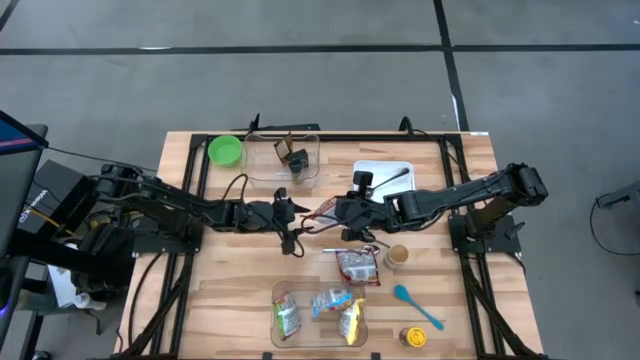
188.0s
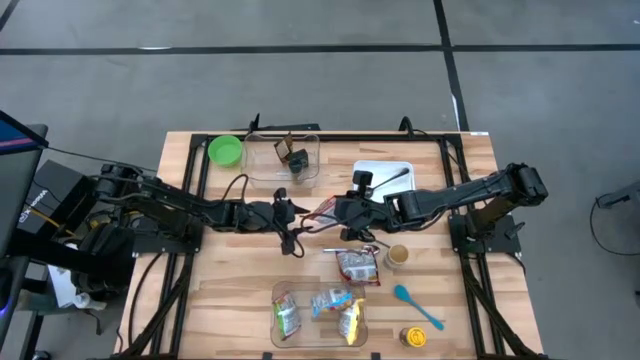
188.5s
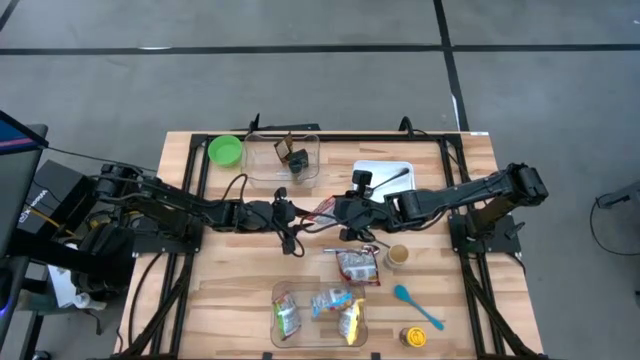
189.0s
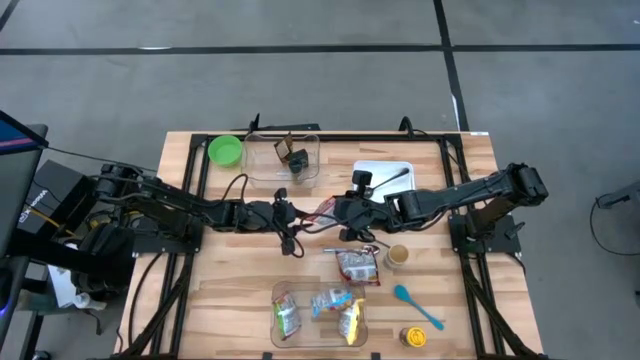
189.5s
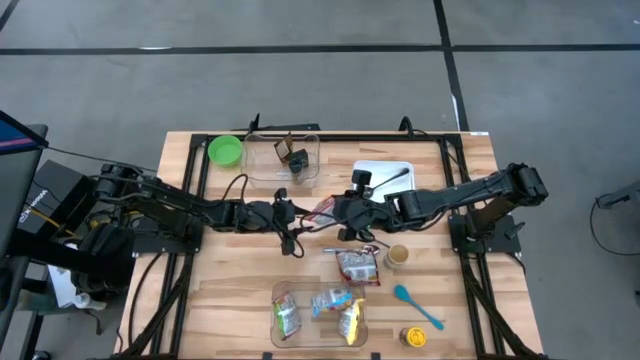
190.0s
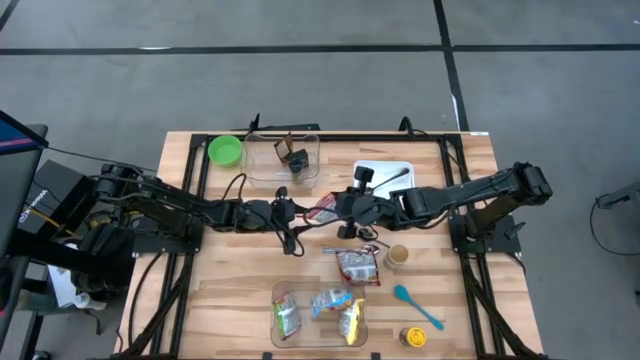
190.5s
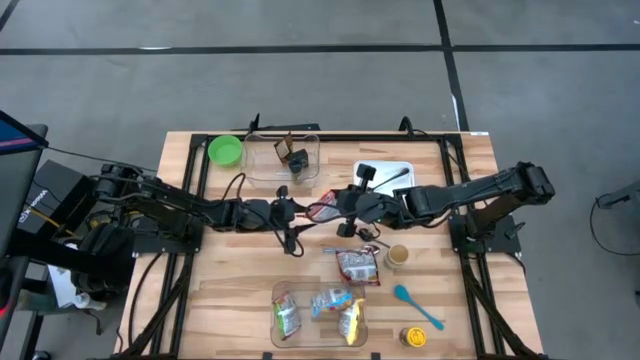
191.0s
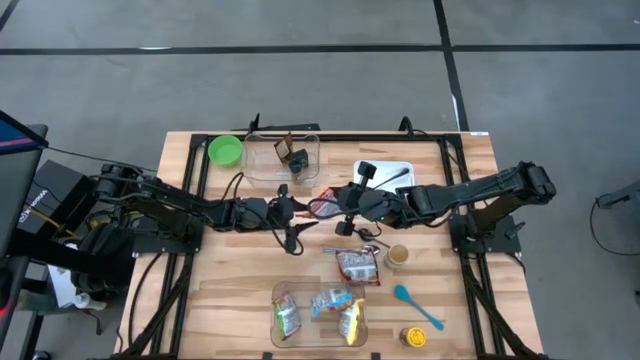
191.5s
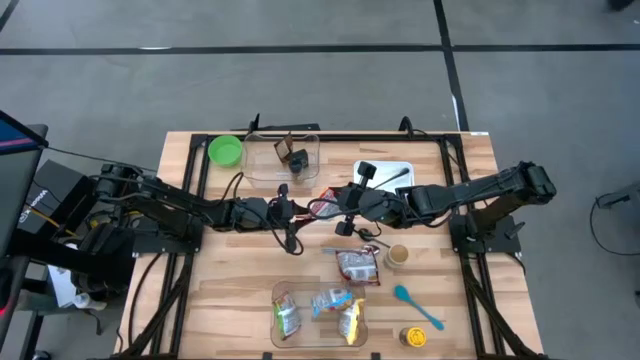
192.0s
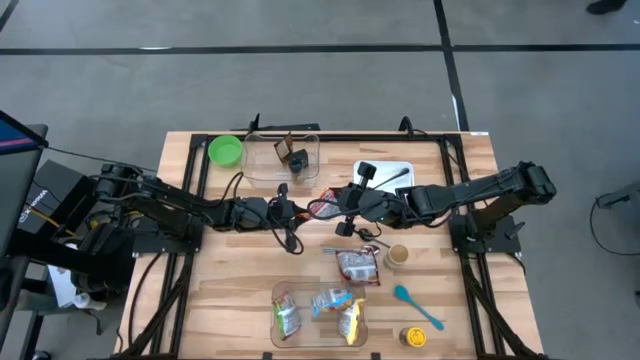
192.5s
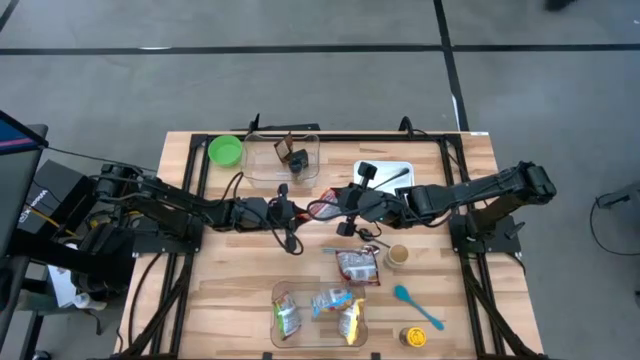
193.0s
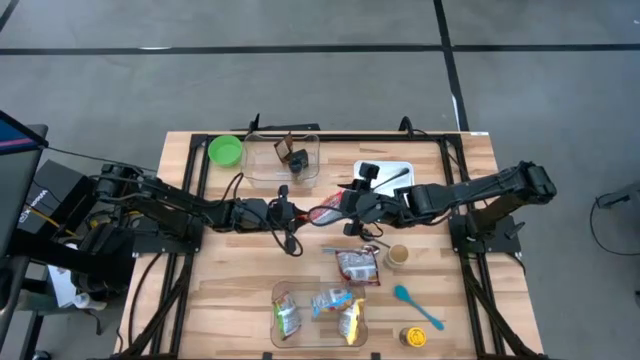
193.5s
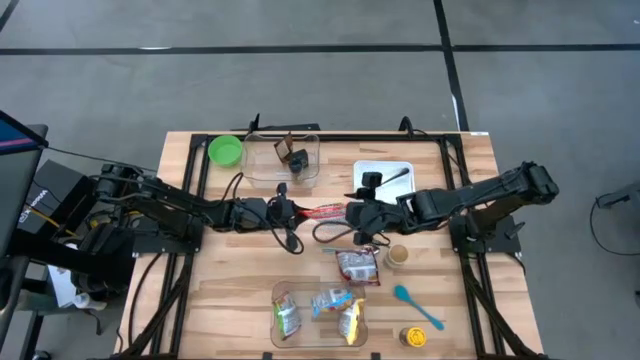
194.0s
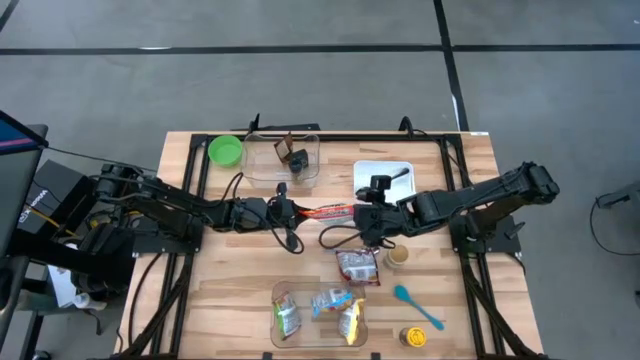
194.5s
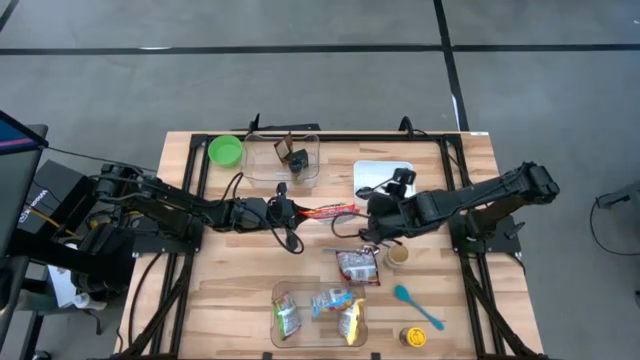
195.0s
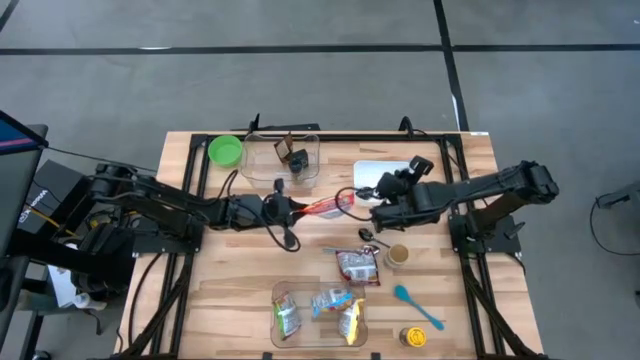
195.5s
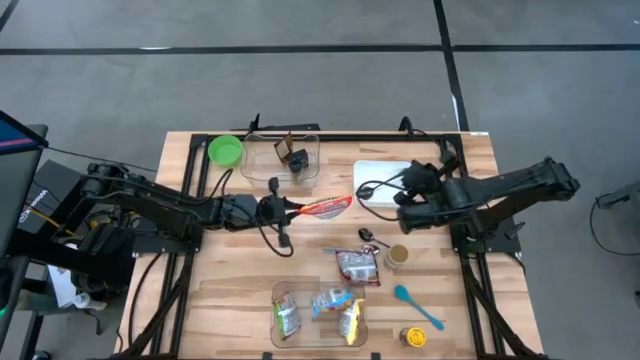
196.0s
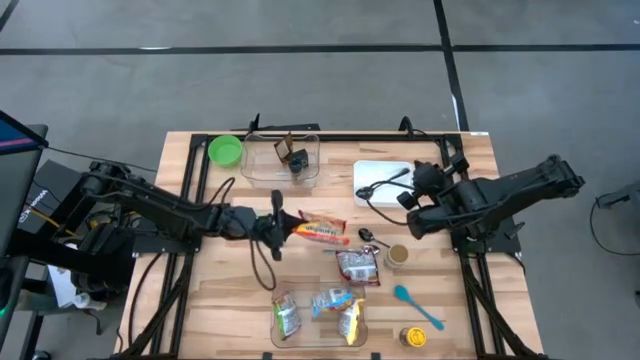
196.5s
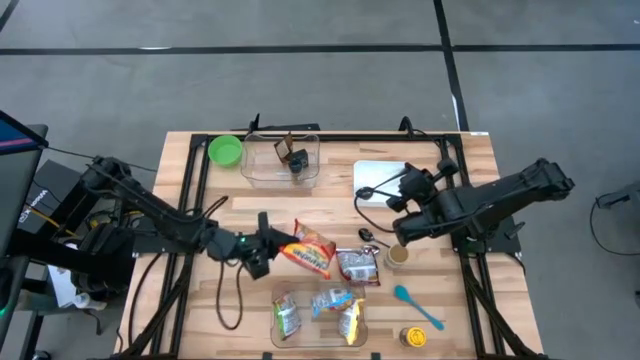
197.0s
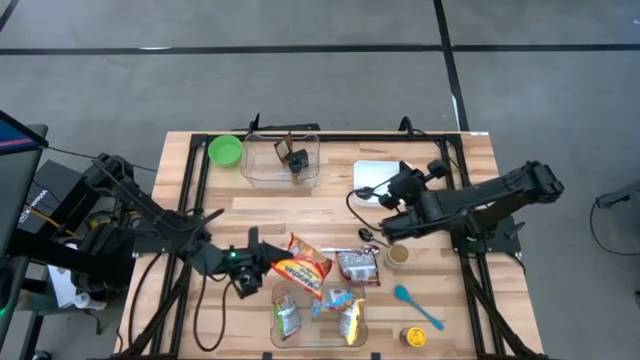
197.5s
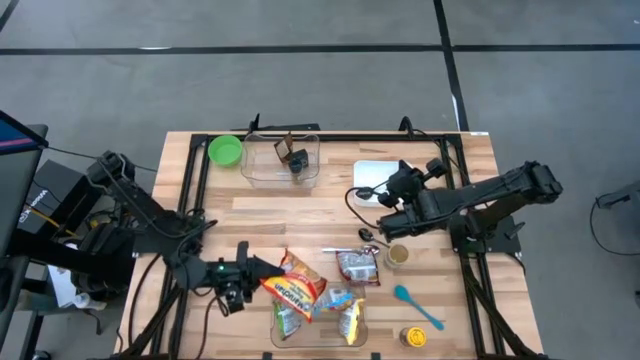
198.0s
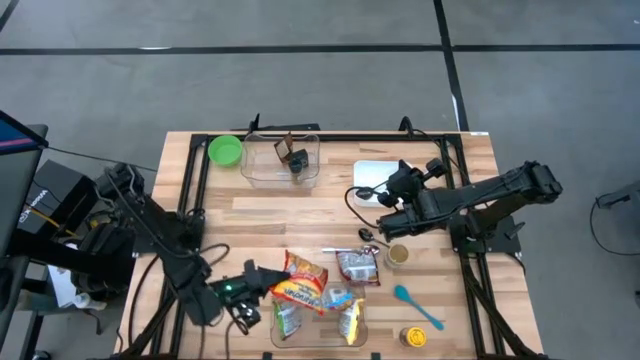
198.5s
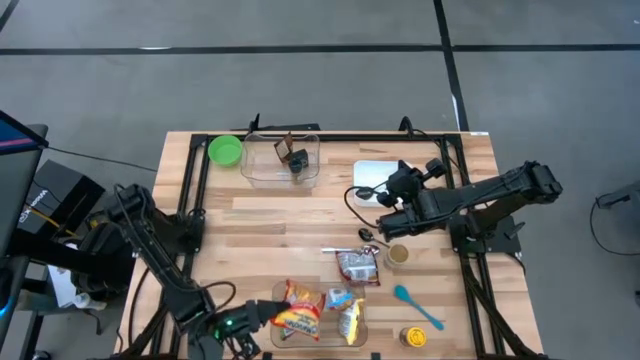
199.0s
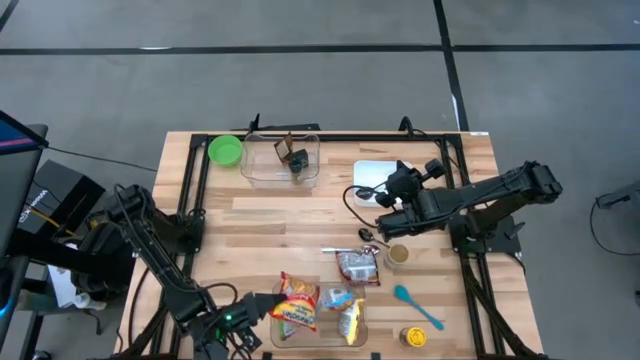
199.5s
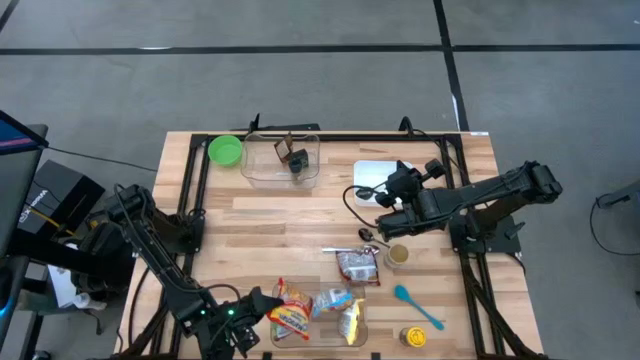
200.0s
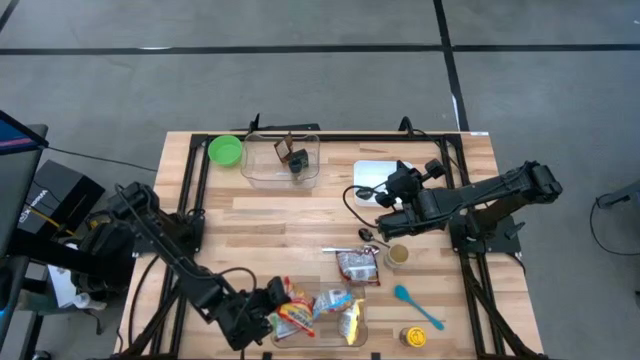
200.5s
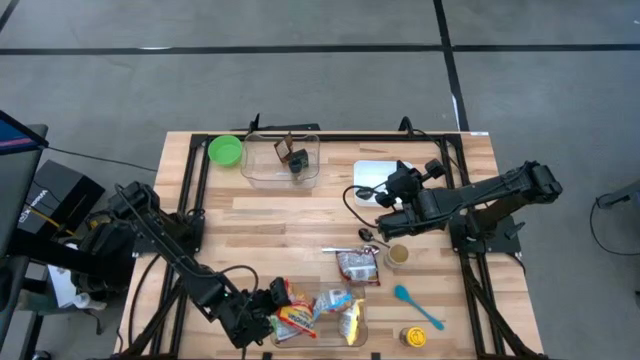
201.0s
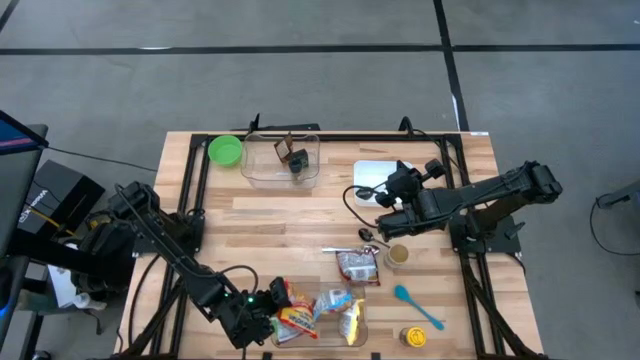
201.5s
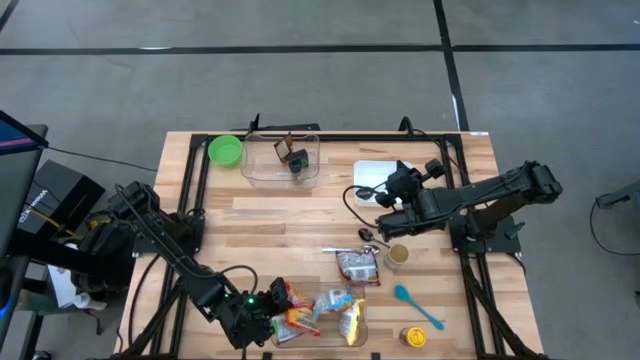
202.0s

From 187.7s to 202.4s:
Task: Pick & Place Food Item
Put the orange noodle pack into the bottom transparent bin

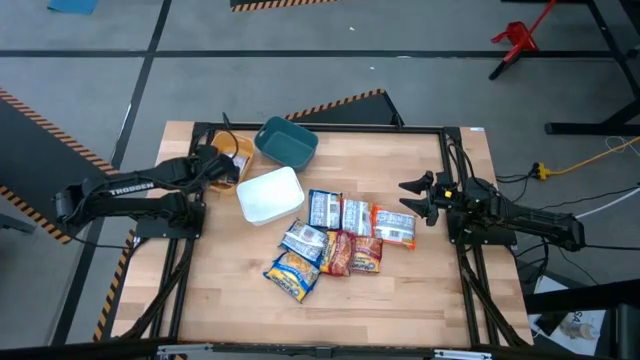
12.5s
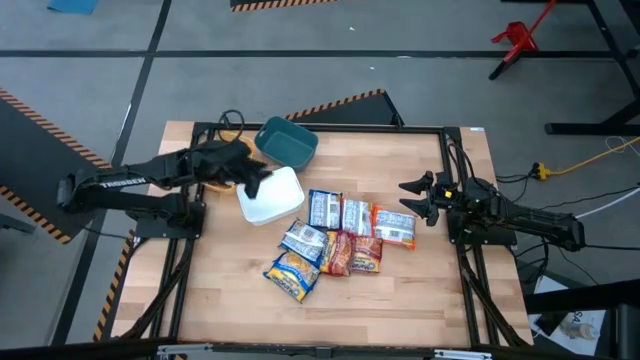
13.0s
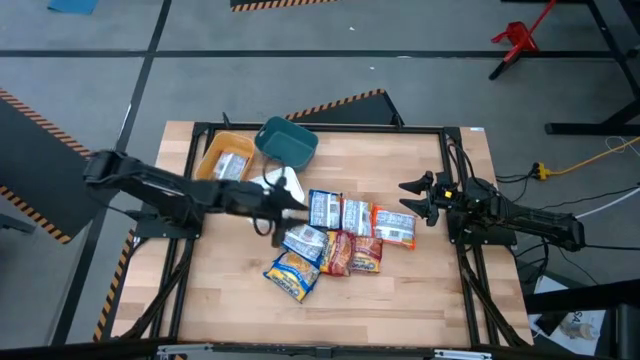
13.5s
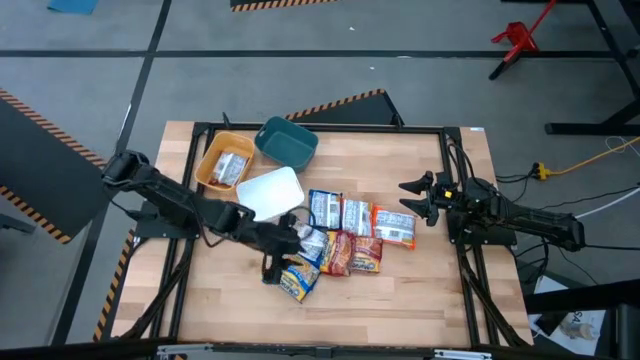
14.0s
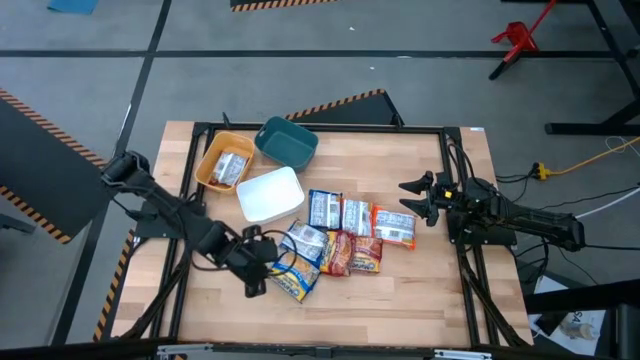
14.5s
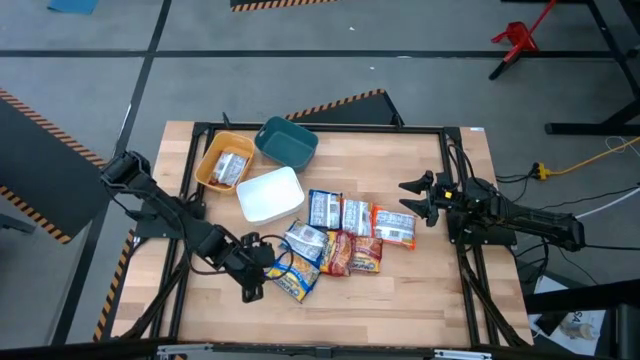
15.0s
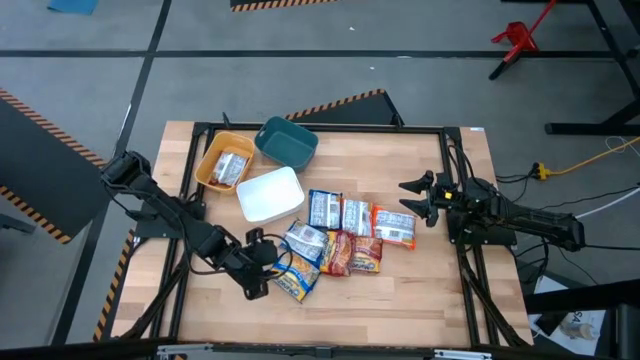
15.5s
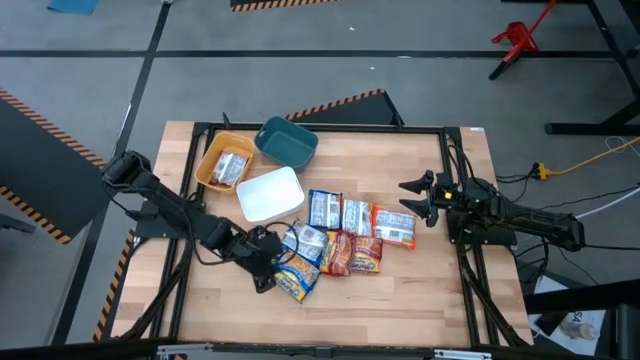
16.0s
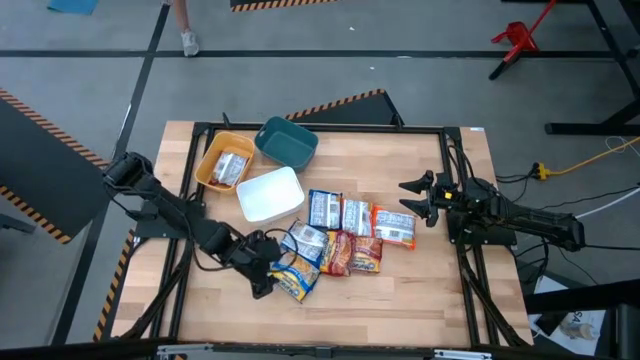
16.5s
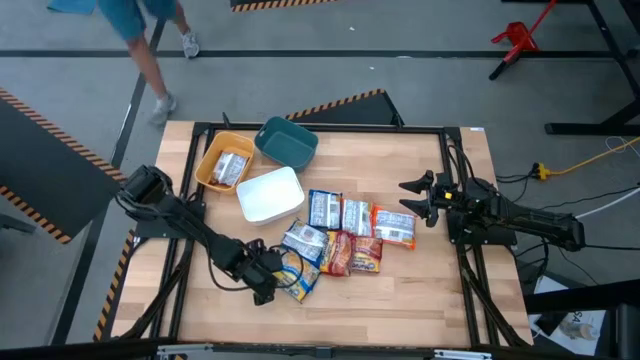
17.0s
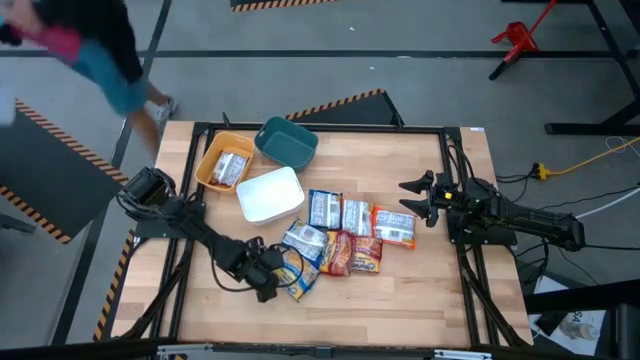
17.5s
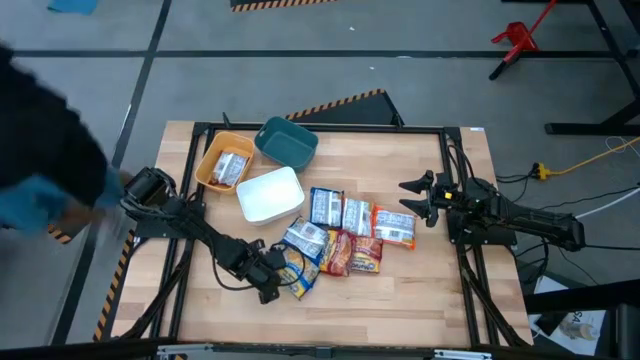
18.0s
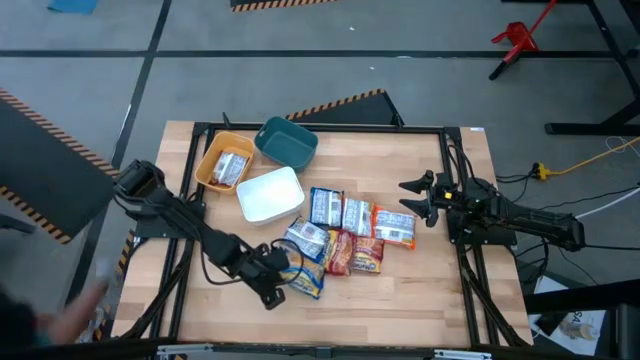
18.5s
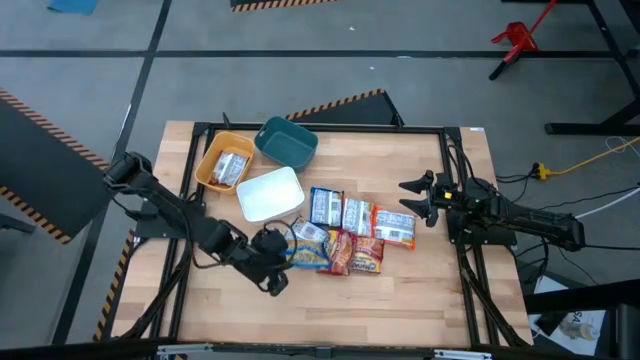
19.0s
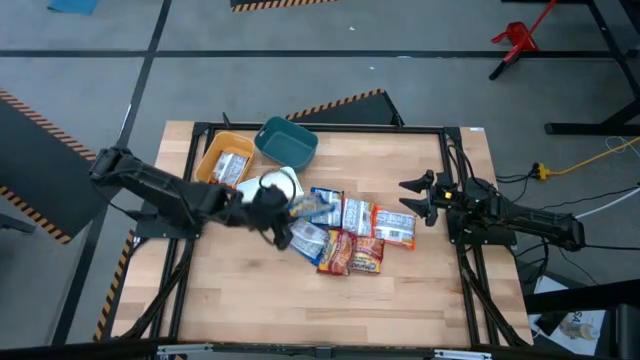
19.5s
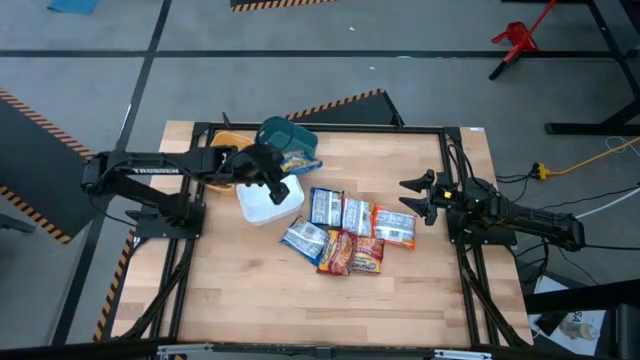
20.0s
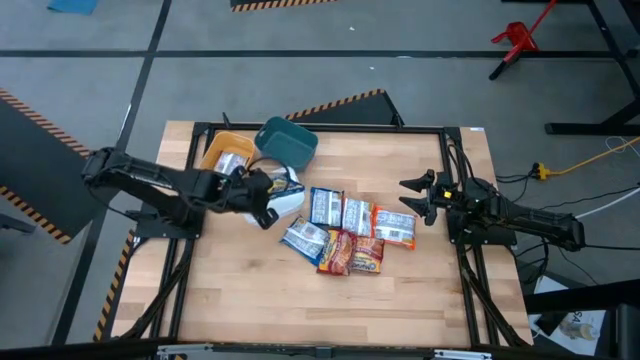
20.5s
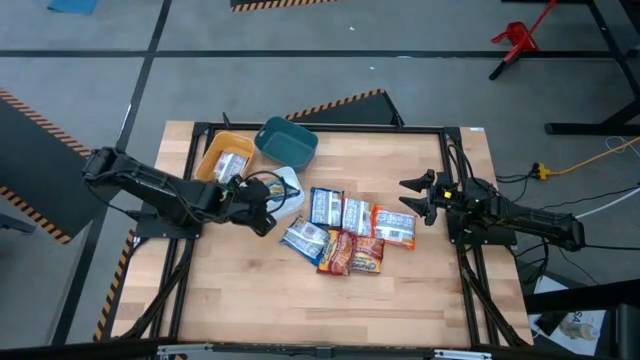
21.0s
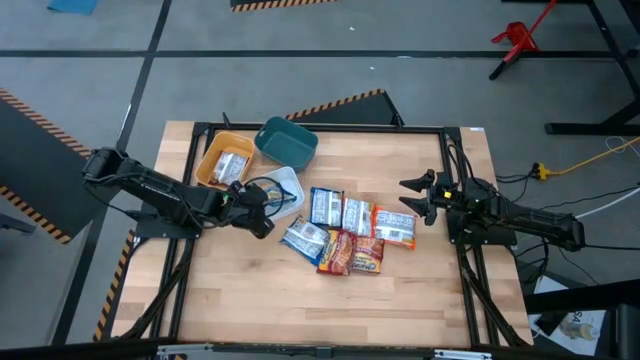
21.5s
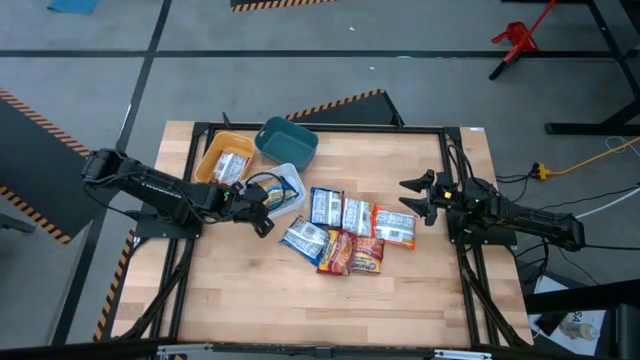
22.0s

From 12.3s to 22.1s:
Task: Sort Maruchan noodles
Put the bottom left blue noodle into the white bin
